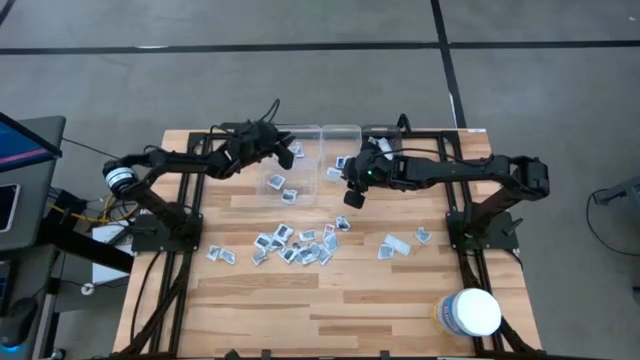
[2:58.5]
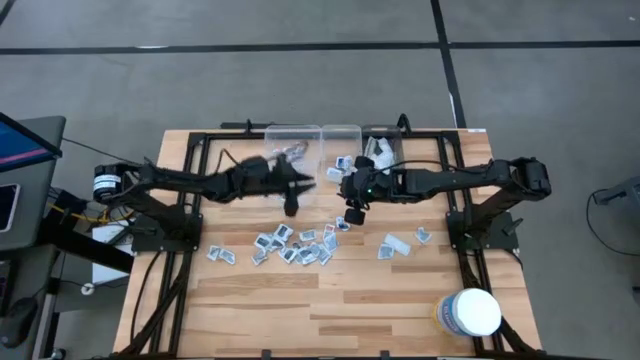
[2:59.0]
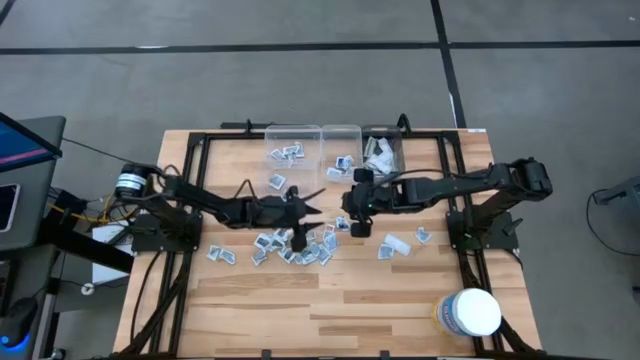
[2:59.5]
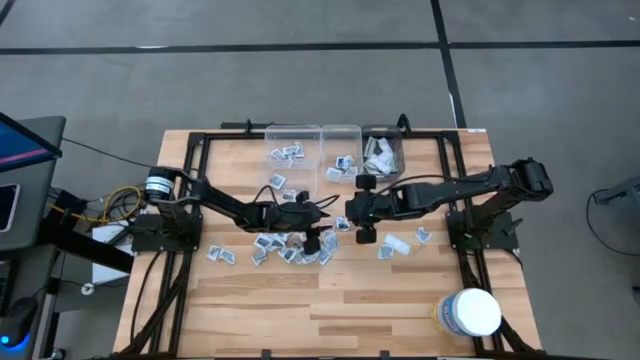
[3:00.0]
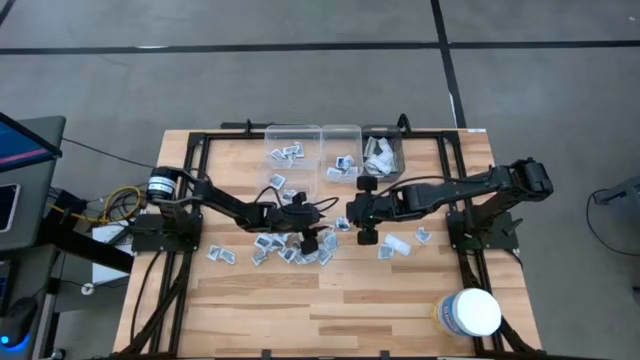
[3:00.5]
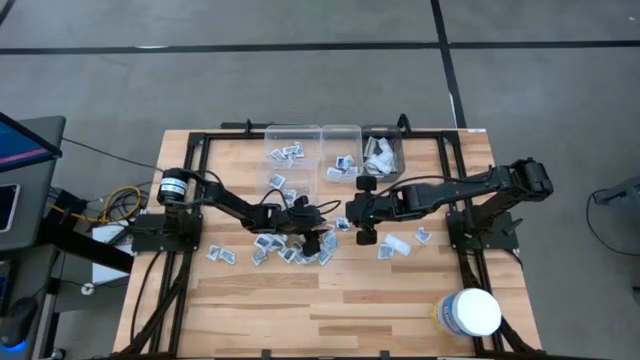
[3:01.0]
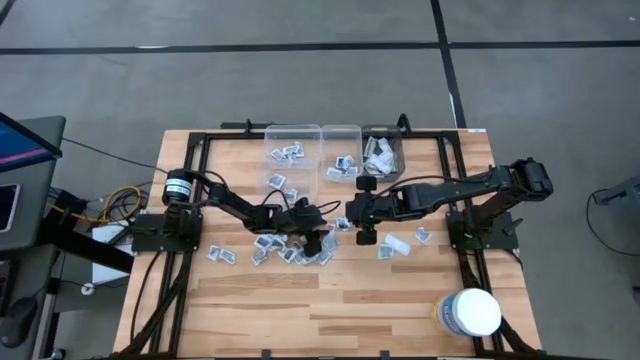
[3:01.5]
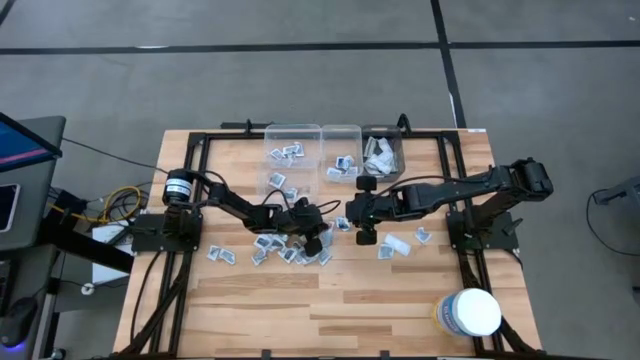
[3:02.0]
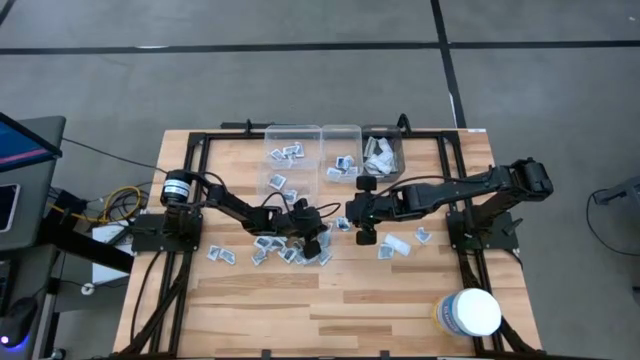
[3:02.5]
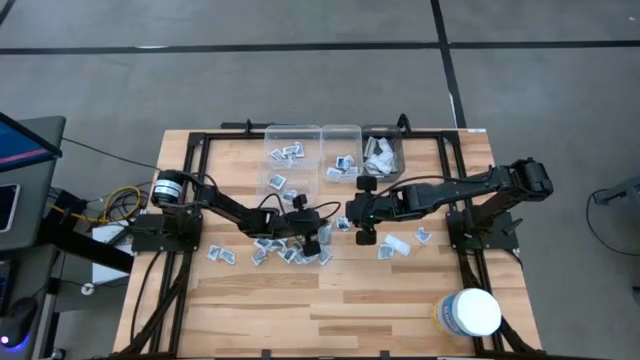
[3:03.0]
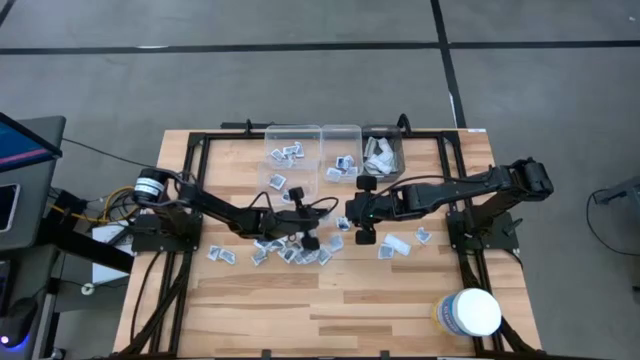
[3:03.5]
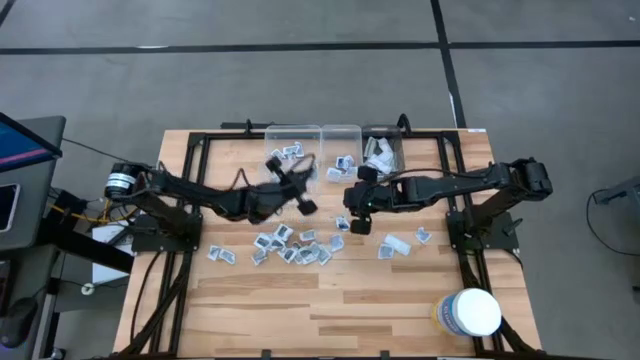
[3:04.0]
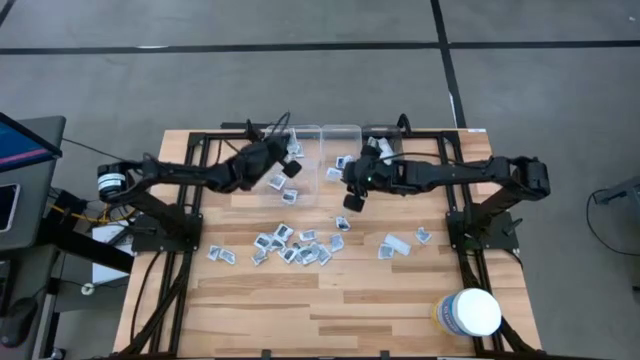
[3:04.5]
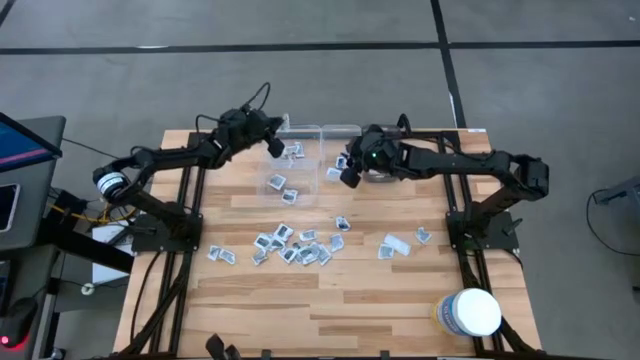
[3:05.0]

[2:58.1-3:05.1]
Task: Pick & Place First Aid Supplies
Put the ointment pack into the top left transparent bin

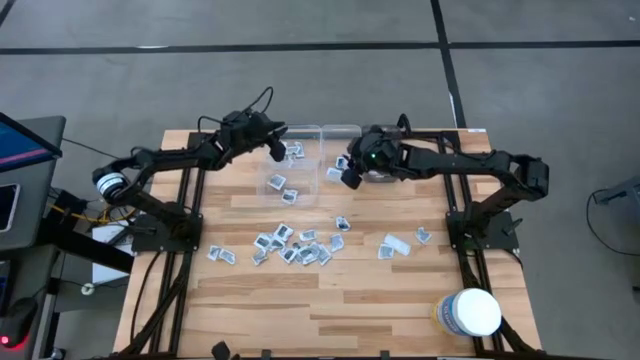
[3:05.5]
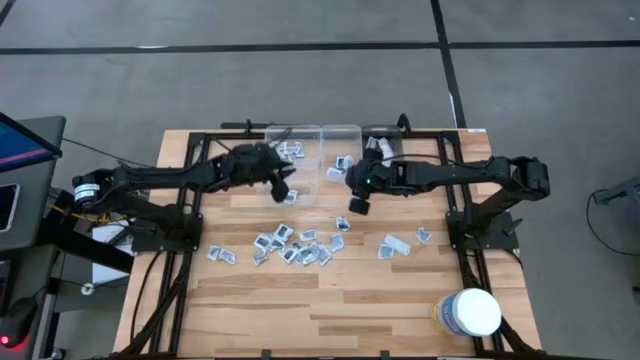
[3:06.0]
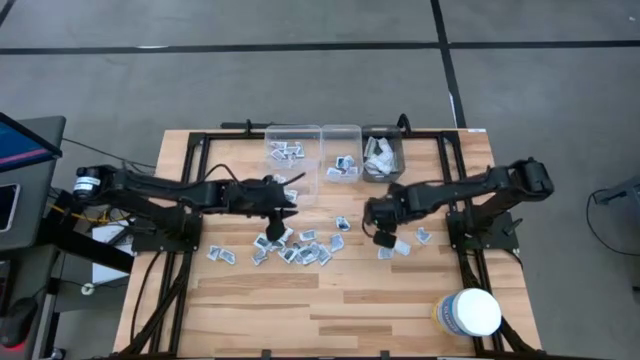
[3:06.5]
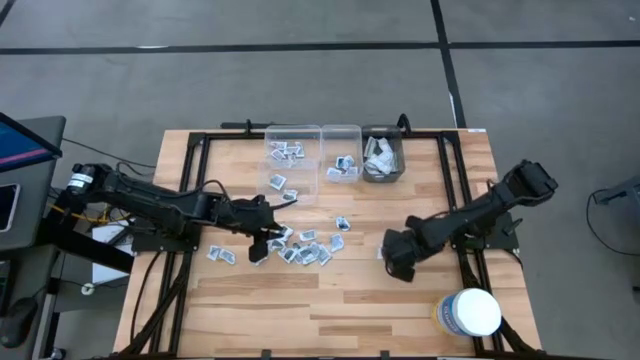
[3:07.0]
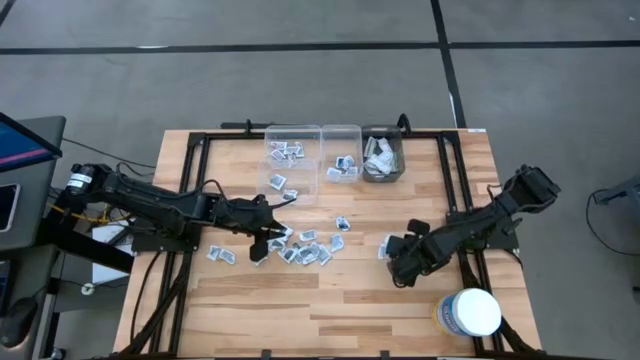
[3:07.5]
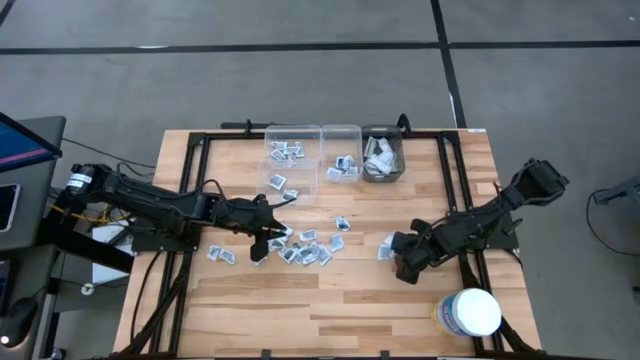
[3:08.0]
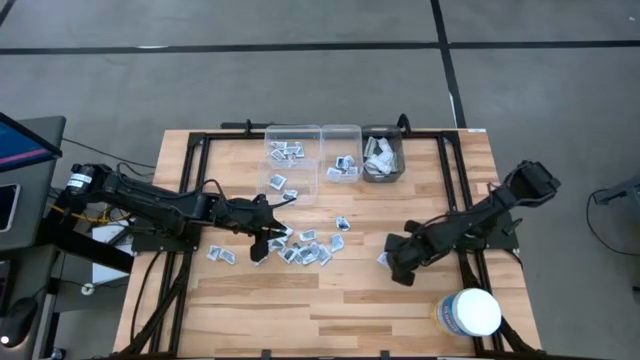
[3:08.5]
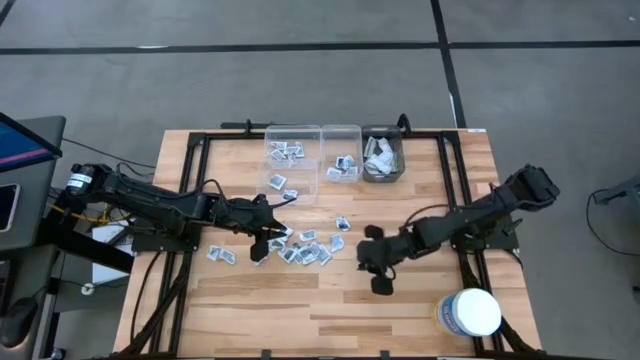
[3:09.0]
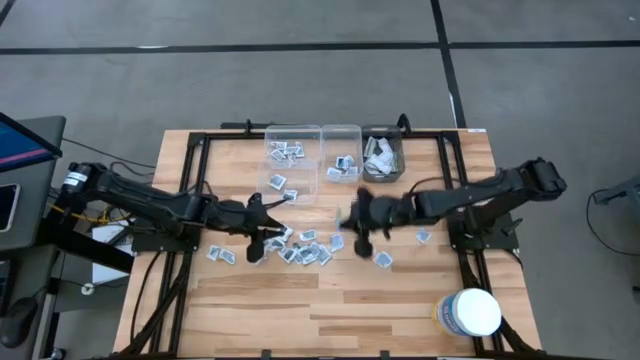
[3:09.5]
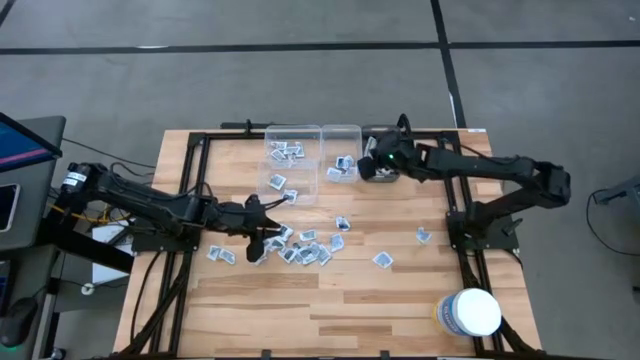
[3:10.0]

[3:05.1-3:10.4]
Put the bandage pack into the black transparent bin

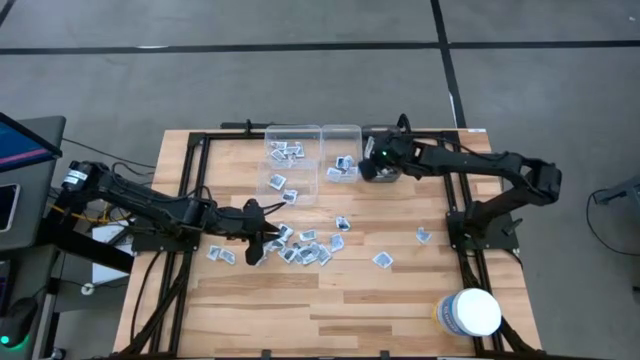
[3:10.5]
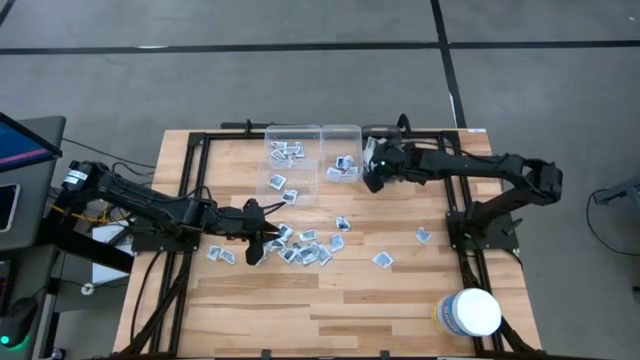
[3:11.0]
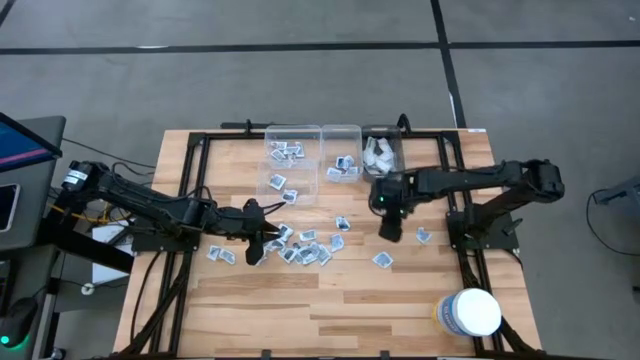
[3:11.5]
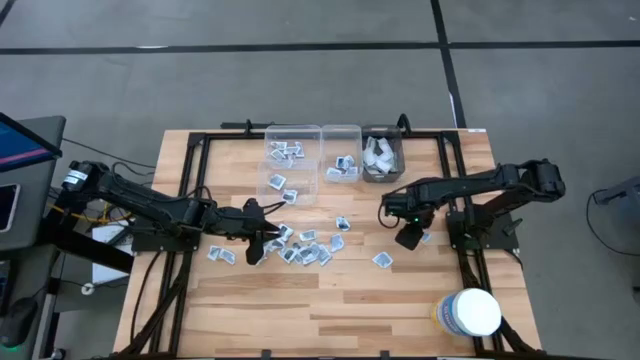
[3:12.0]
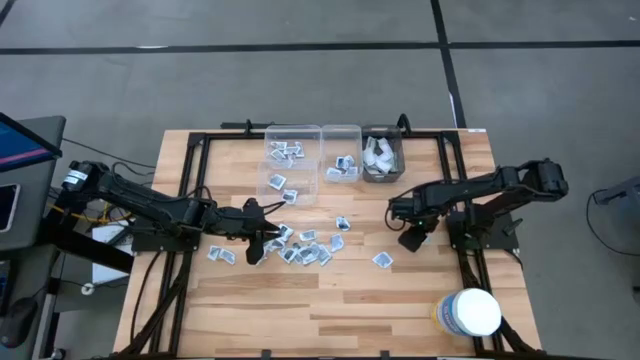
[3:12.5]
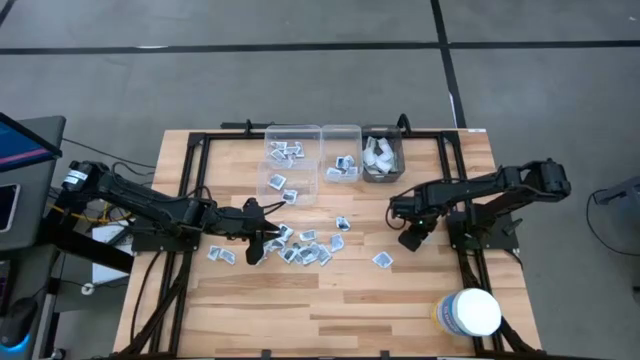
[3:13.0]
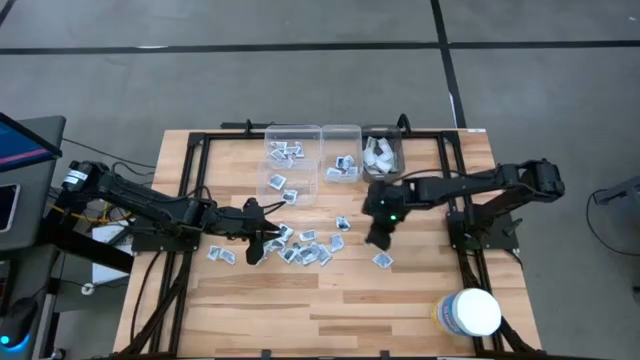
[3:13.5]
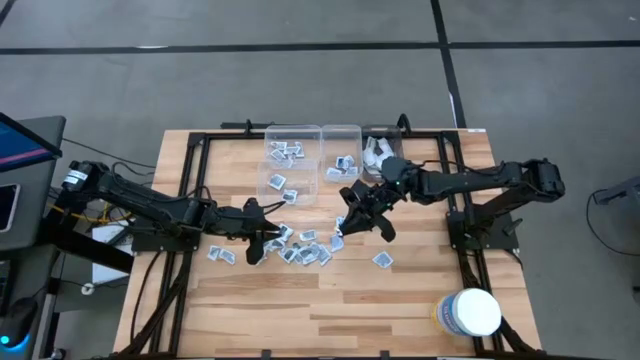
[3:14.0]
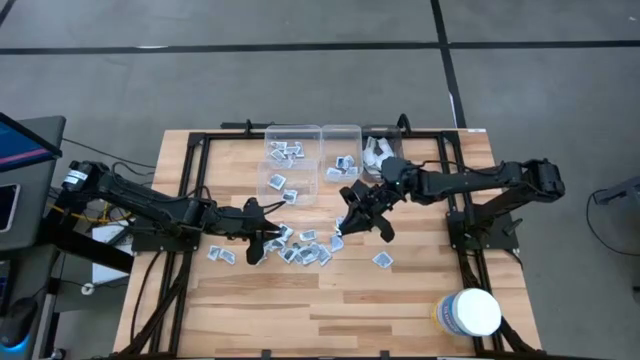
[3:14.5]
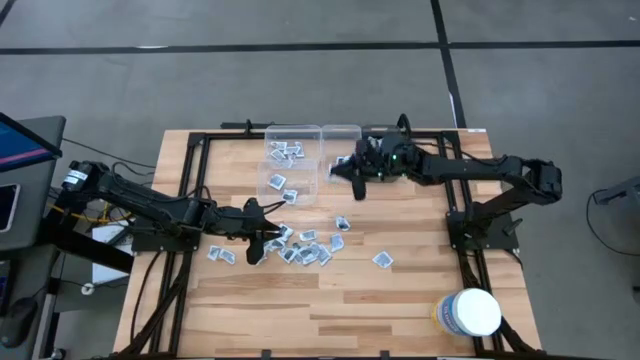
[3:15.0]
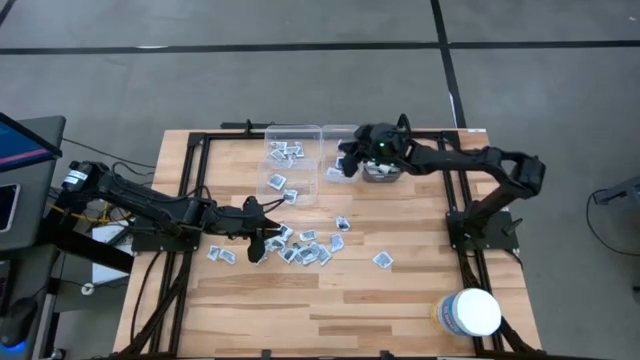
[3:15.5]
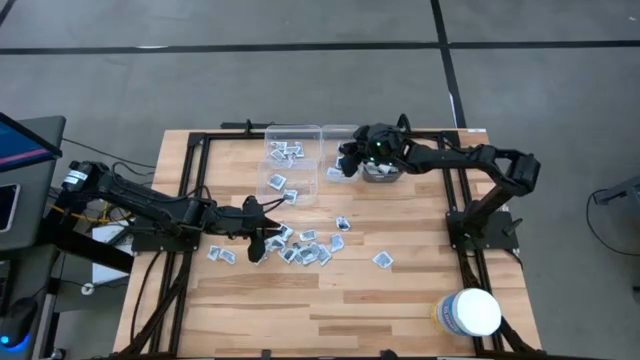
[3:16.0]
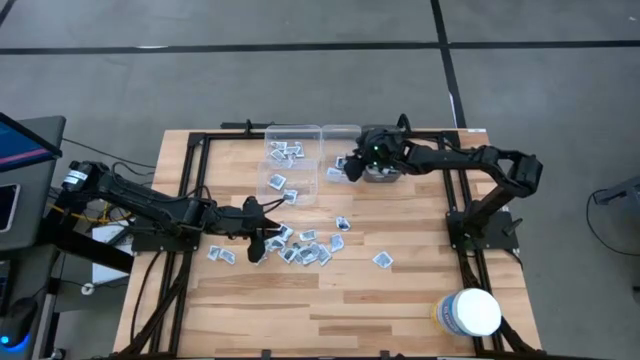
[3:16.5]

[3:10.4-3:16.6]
Put the alcohol pad into the top right transparent bin

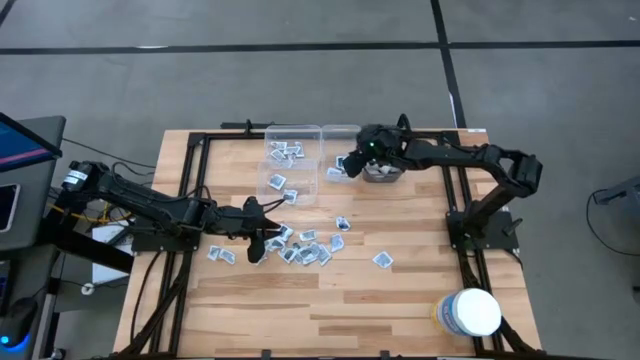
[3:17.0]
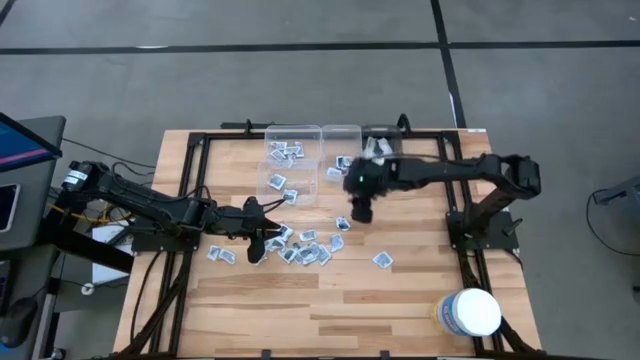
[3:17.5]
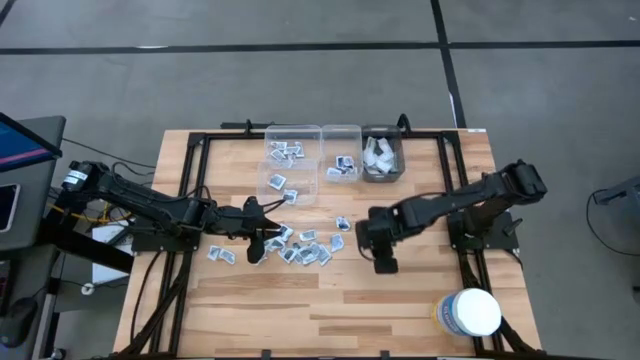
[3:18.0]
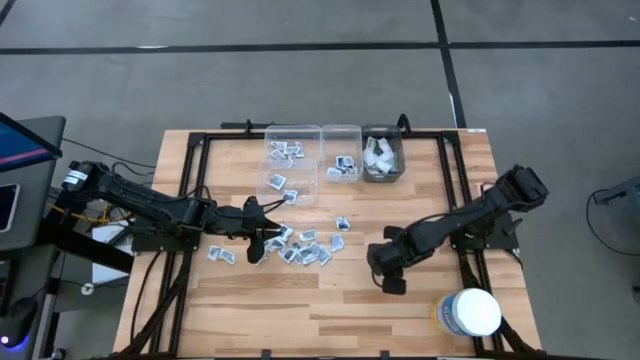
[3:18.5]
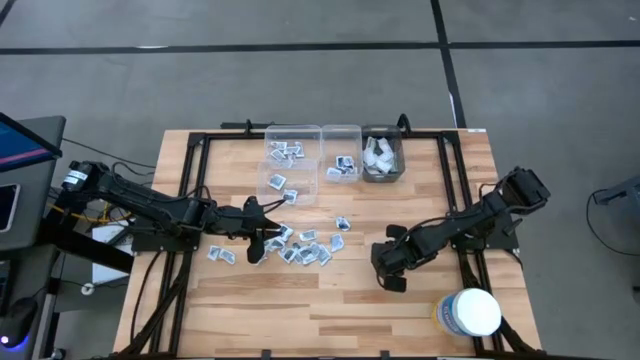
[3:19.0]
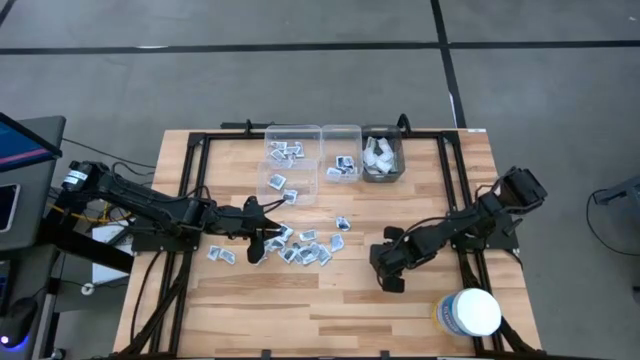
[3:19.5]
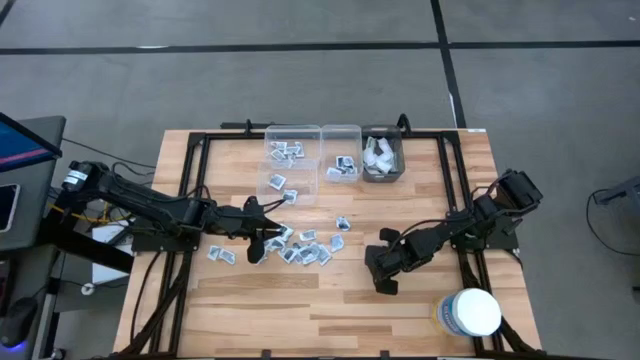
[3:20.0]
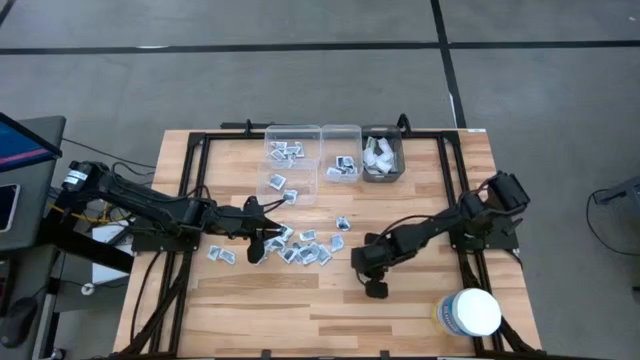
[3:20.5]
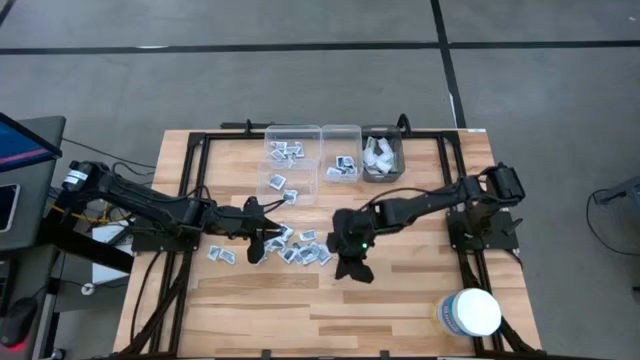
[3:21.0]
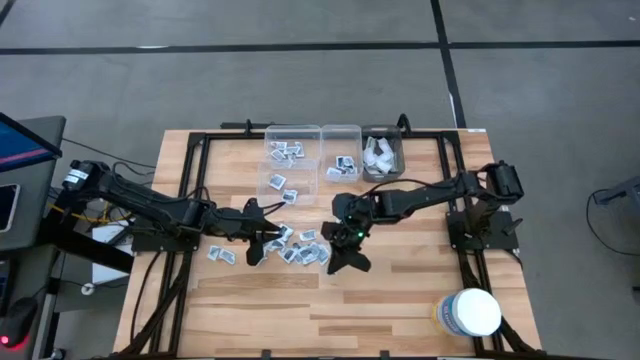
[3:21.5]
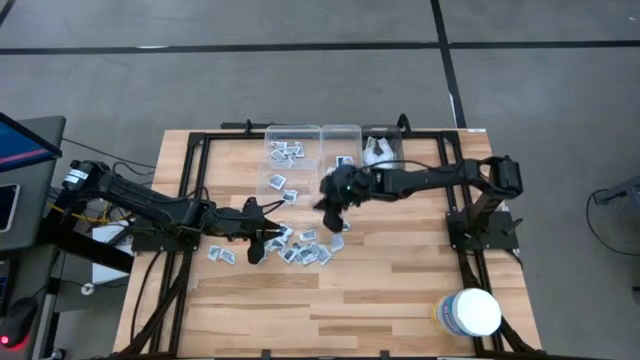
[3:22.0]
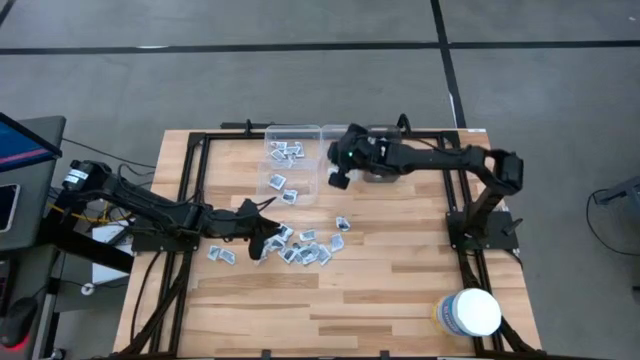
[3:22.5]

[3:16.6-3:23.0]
Put the alcohol pad into the top right transparent bin
